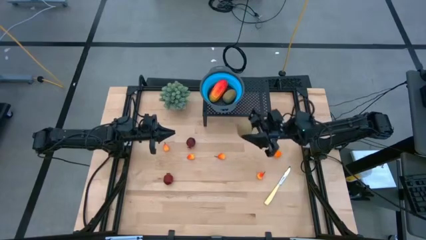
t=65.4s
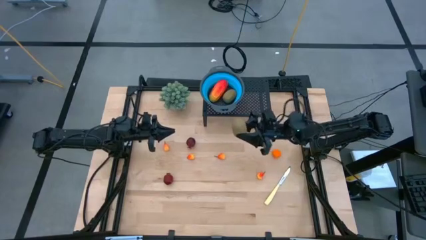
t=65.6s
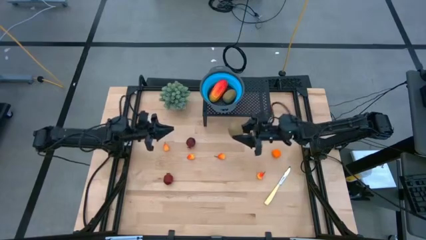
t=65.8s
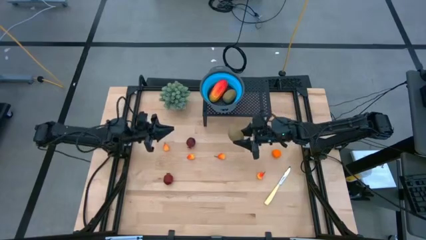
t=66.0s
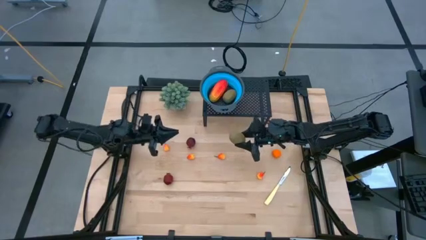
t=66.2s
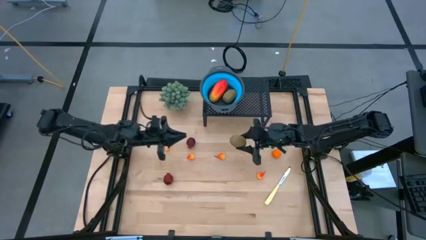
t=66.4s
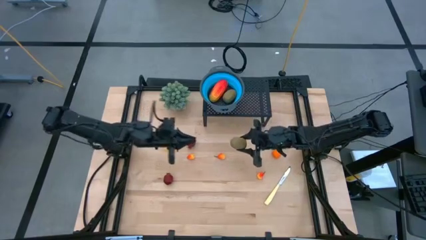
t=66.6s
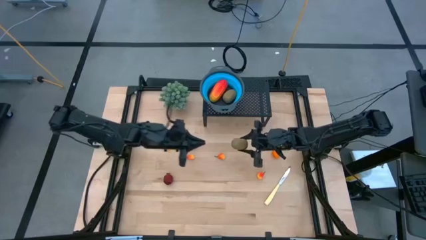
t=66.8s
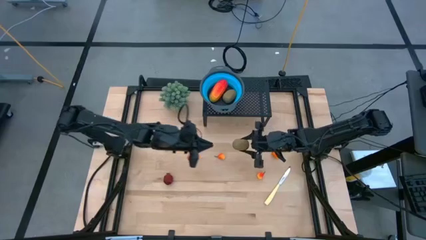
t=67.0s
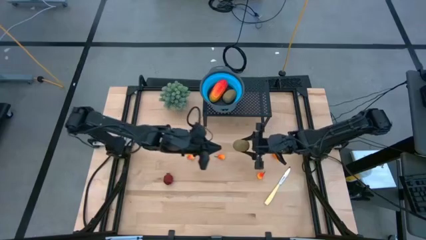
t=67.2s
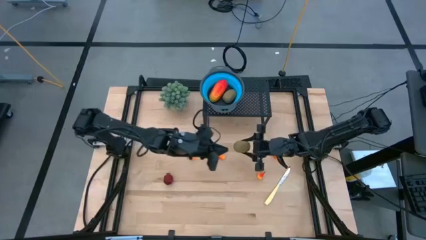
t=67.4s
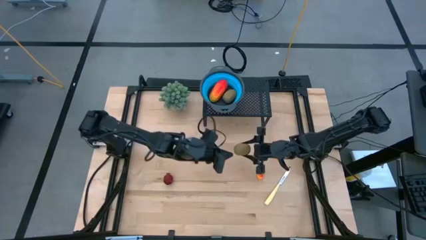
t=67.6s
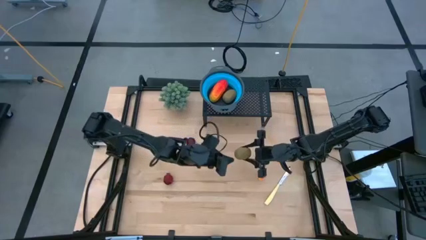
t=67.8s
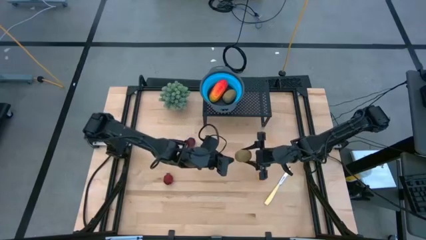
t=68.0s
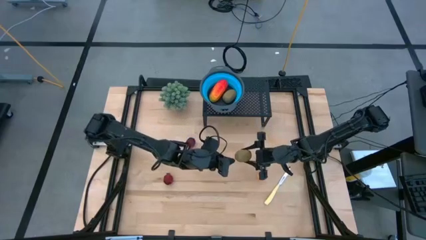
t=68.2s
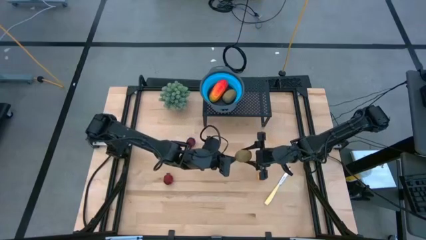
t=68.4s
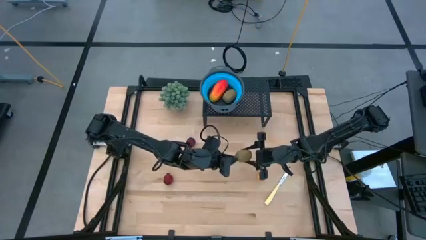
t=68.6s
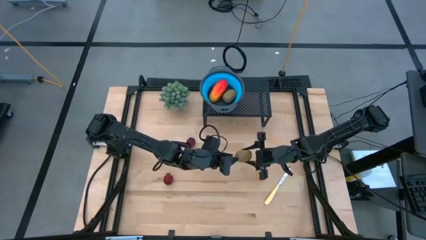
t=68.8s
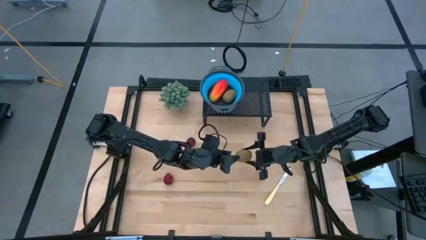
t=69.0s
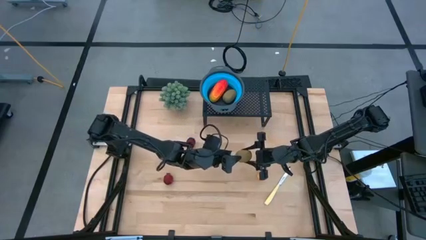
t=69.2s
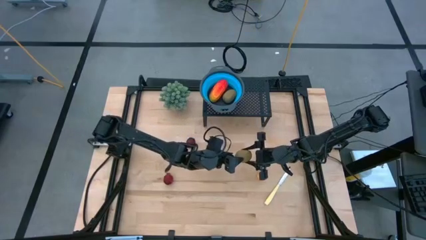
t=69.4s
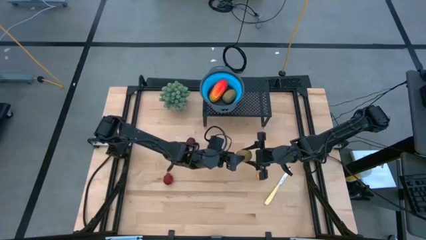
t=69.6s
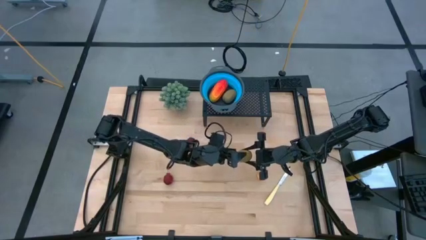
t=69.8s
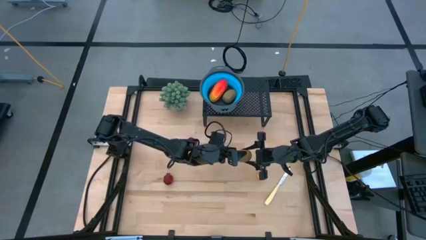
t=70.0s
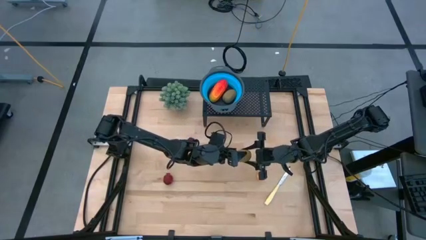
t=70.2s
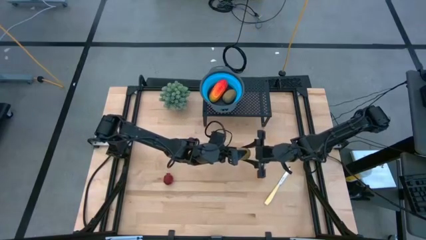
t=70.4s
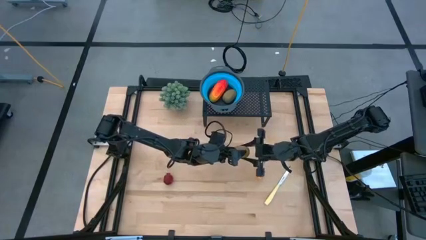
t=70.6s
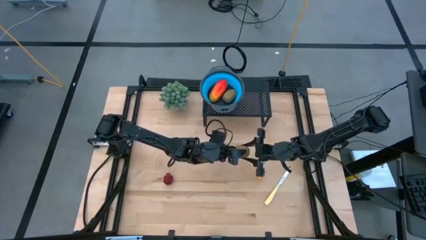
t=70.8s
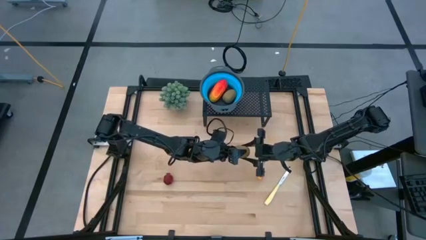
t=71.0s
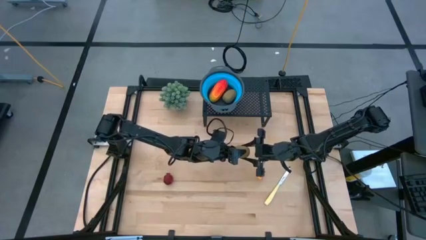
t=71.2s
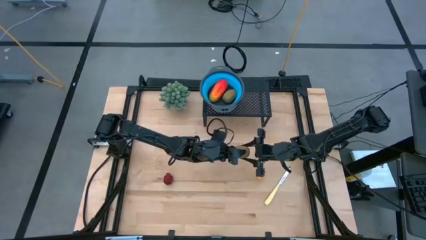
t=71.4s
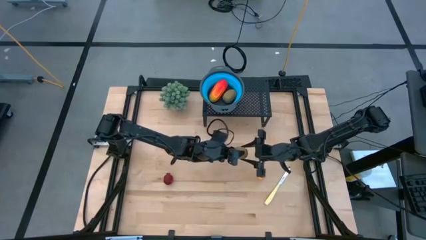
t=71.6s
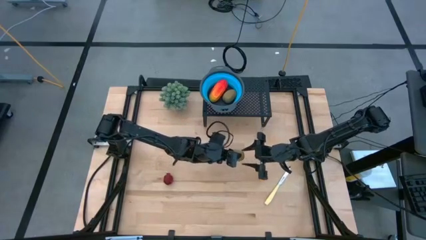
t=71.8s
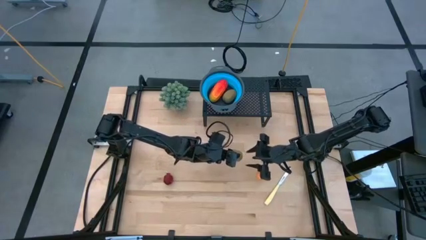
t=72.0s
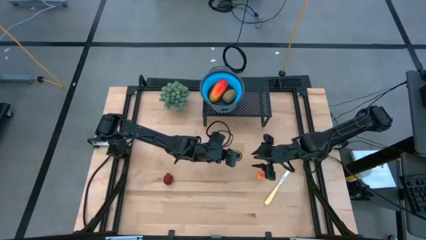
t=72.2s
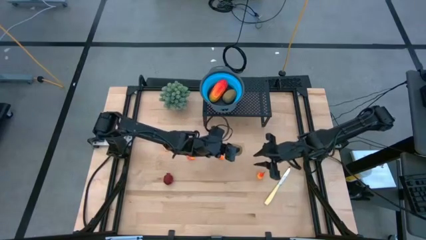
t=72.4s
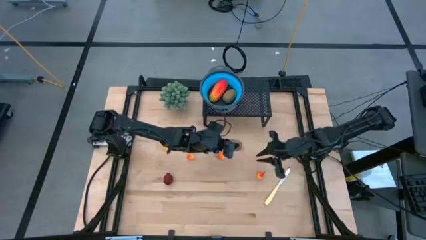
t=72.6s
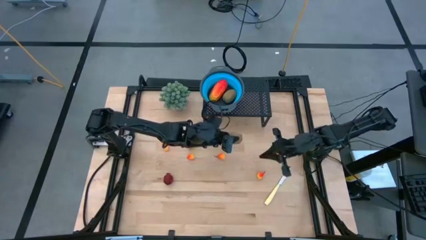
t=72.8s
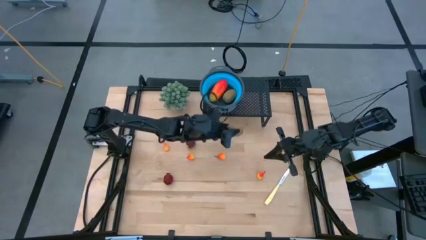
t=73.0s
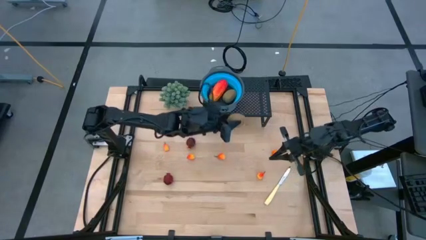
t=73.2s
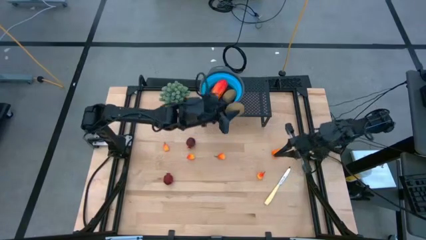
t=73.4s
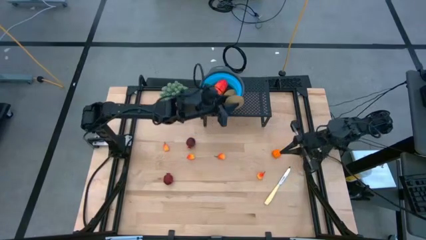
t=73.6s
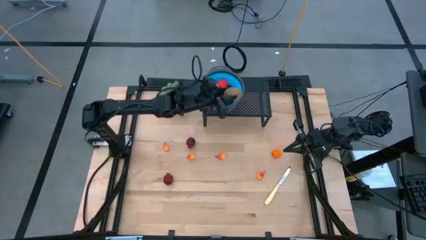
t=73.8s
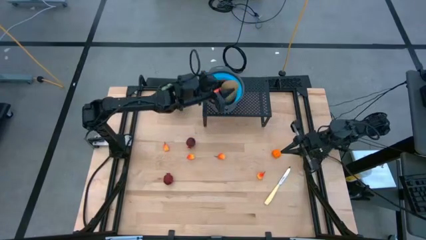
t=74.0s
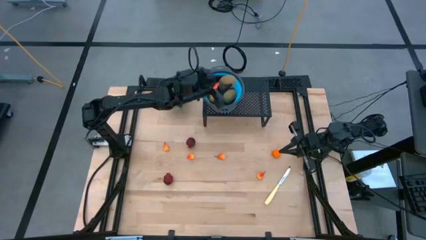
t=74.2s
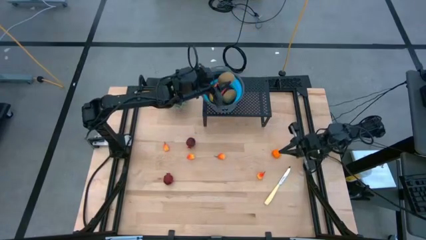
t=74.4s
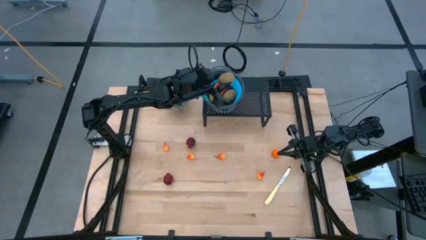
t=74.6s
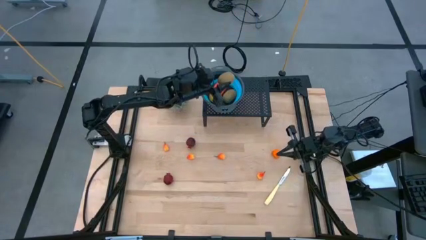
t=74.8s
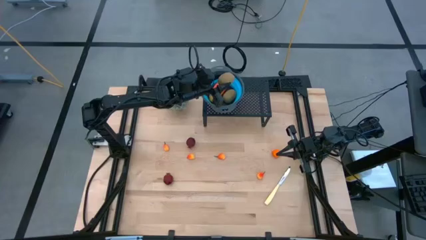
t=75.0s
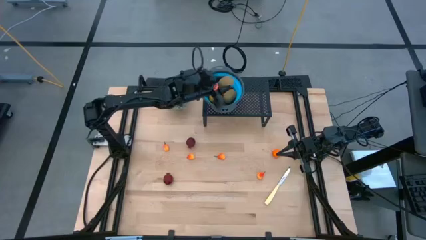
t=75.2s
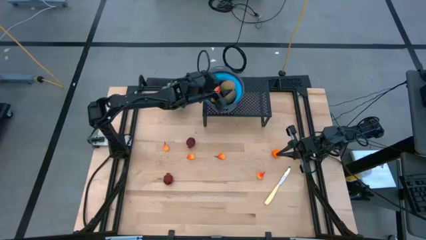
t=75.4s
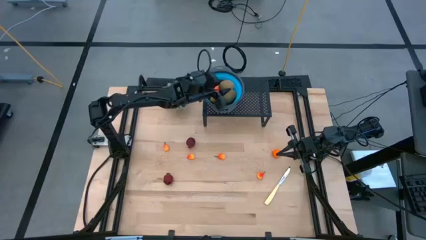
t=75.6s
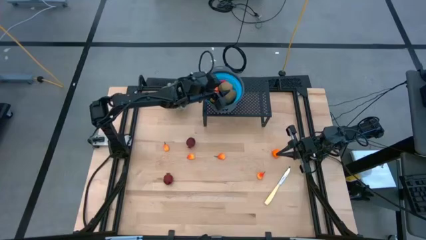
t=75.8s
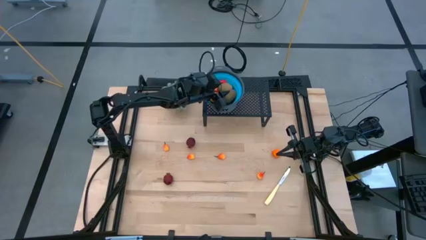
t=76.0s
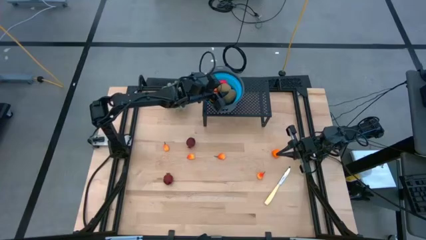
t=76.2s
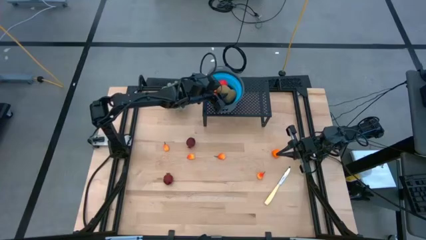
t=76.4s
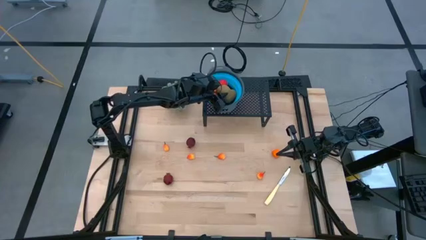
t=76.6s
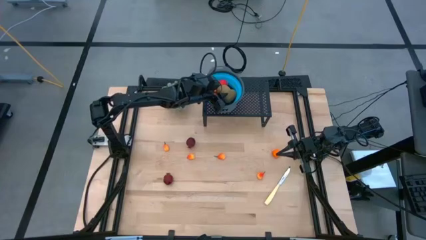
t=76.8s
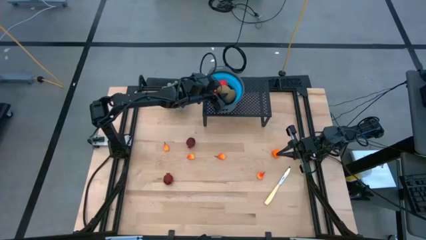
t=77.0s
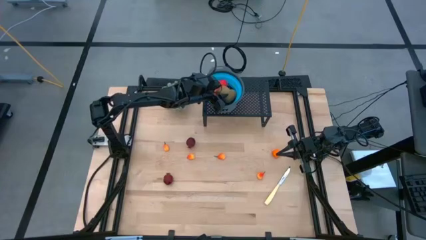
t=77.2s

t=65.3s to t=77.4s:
Task: Pick & Place Fruit
Put the brown kiwi into the blue strainer bowl on the shelf
